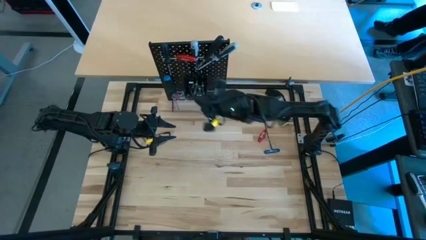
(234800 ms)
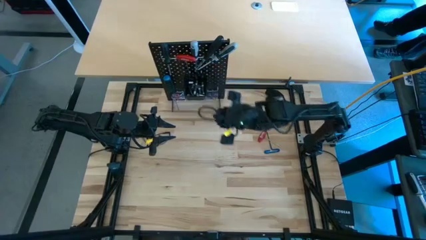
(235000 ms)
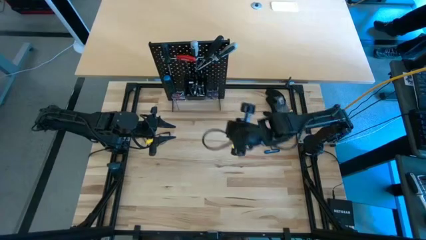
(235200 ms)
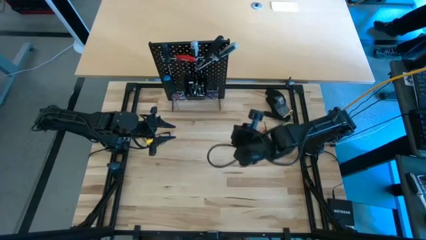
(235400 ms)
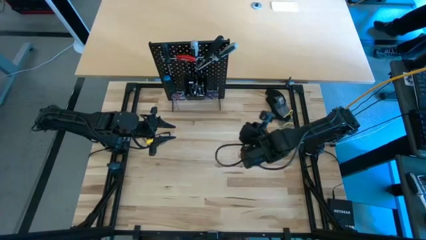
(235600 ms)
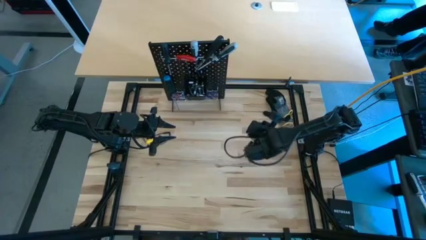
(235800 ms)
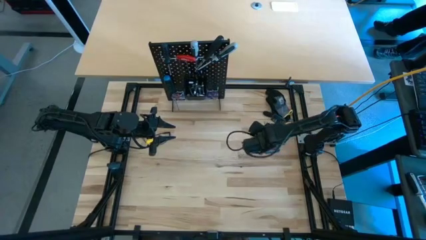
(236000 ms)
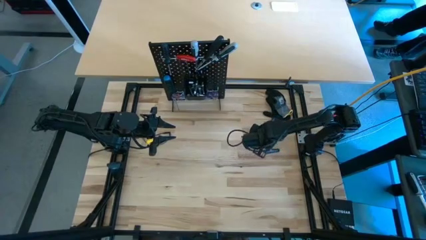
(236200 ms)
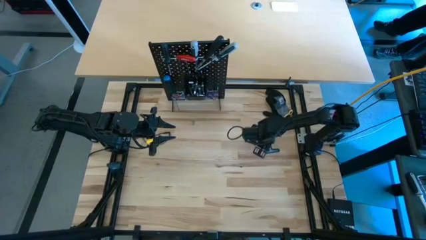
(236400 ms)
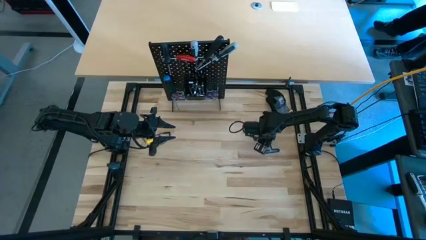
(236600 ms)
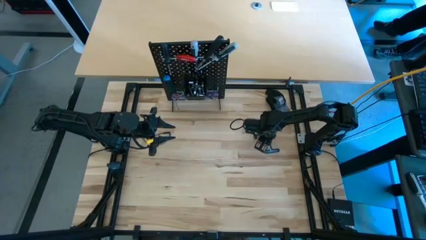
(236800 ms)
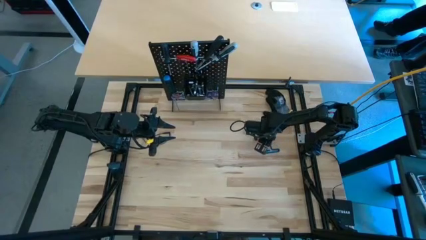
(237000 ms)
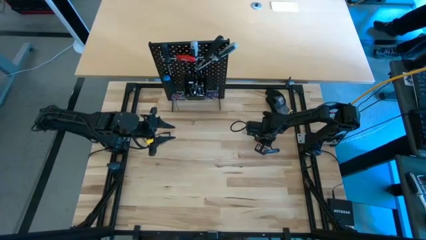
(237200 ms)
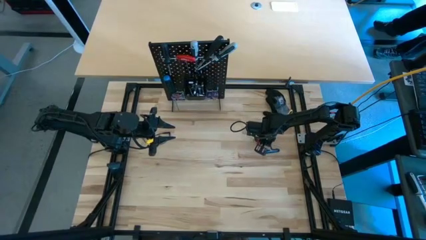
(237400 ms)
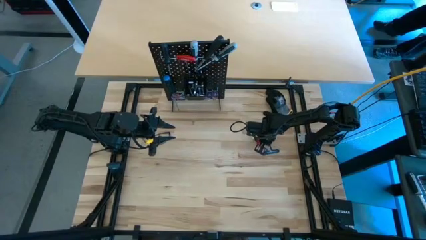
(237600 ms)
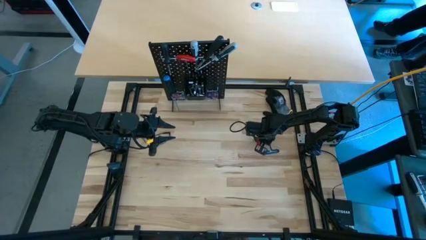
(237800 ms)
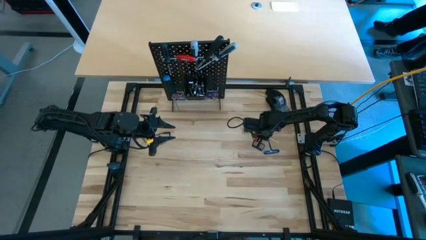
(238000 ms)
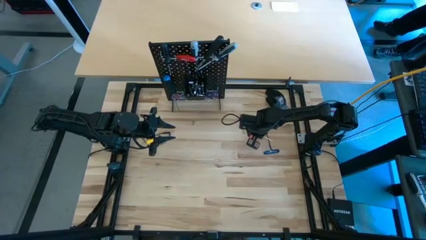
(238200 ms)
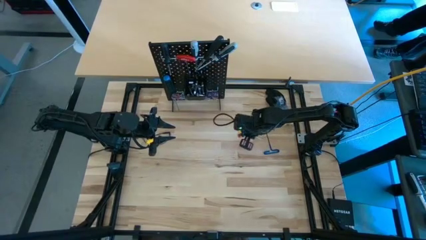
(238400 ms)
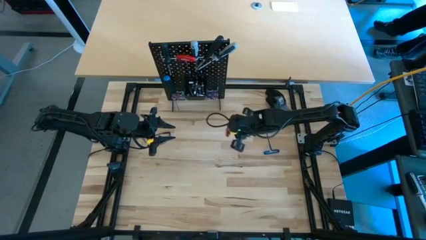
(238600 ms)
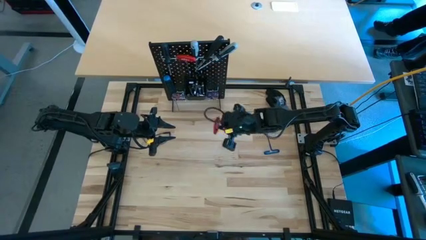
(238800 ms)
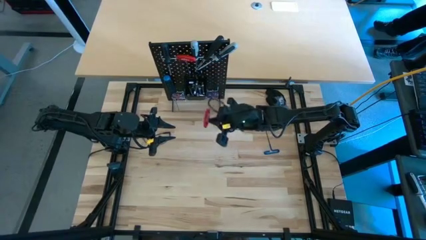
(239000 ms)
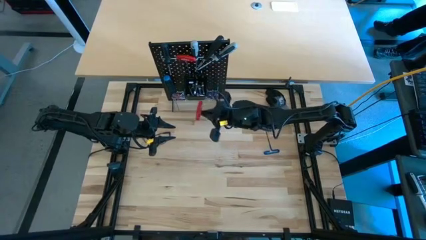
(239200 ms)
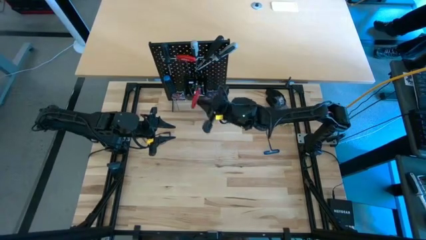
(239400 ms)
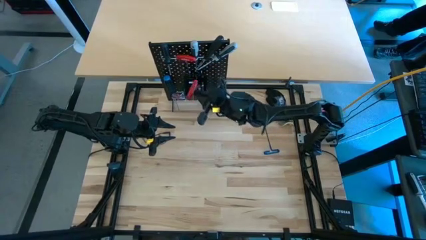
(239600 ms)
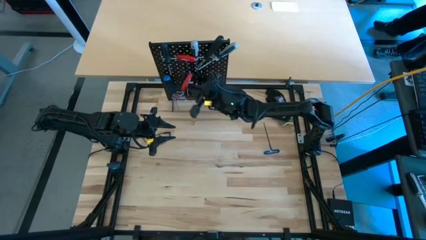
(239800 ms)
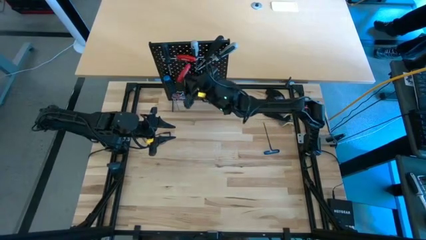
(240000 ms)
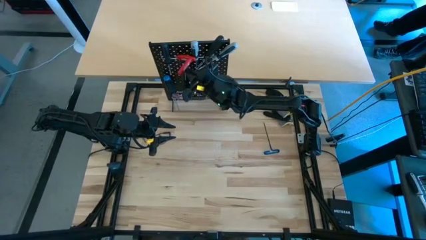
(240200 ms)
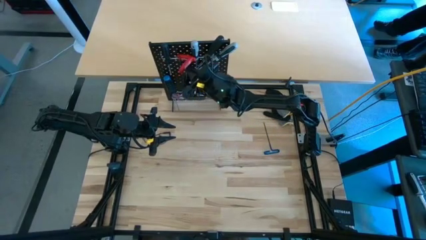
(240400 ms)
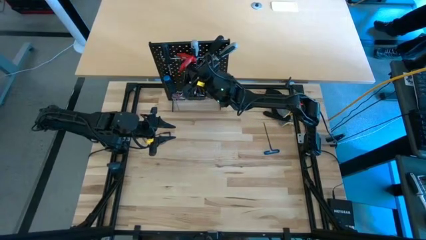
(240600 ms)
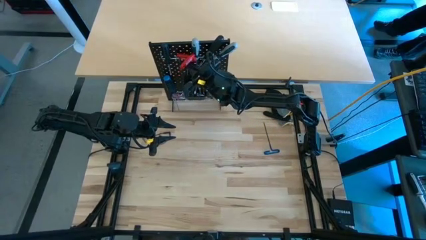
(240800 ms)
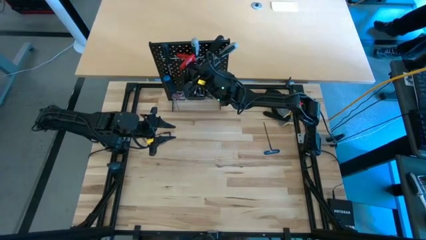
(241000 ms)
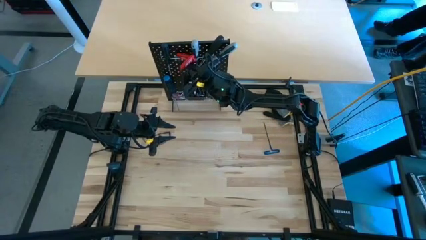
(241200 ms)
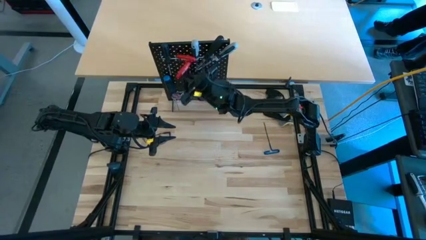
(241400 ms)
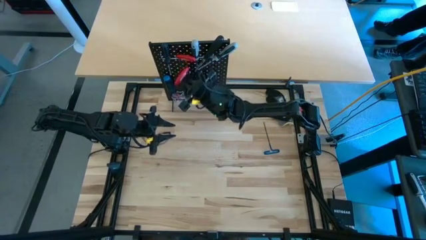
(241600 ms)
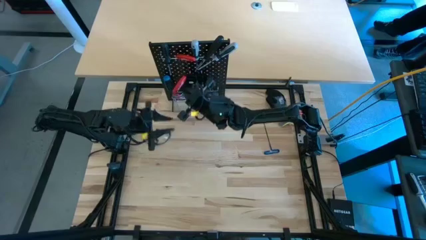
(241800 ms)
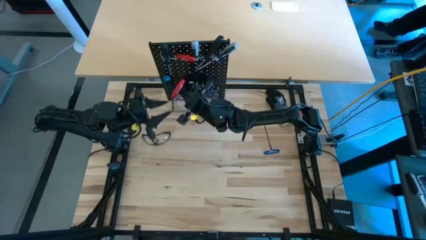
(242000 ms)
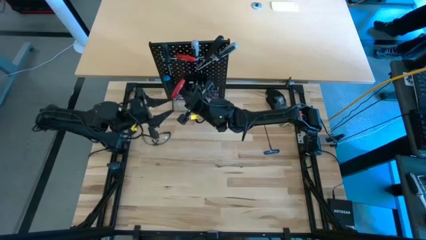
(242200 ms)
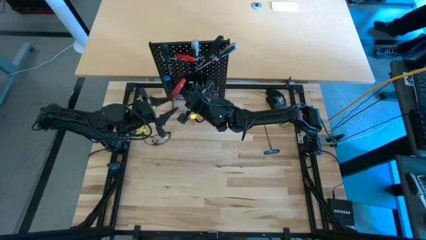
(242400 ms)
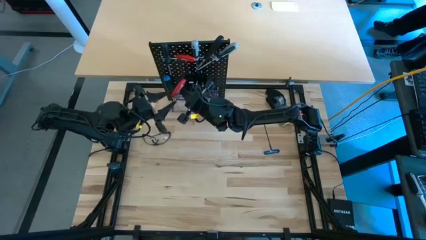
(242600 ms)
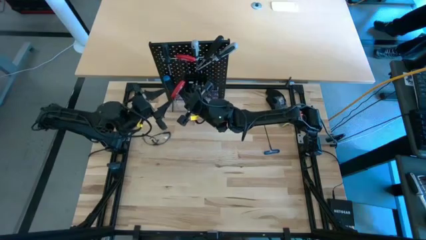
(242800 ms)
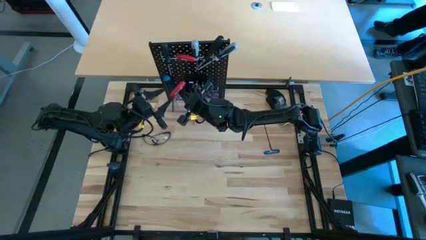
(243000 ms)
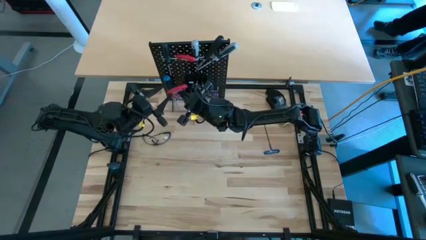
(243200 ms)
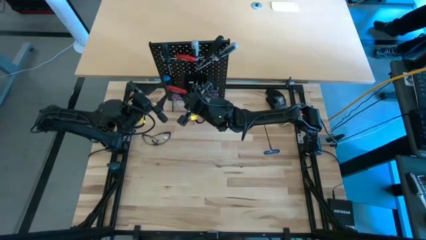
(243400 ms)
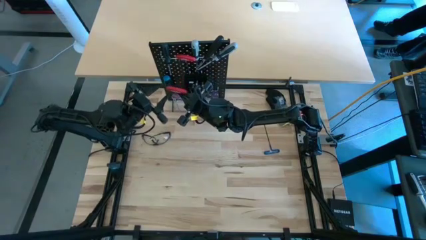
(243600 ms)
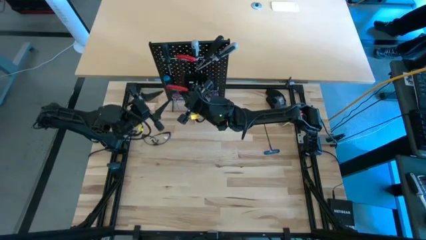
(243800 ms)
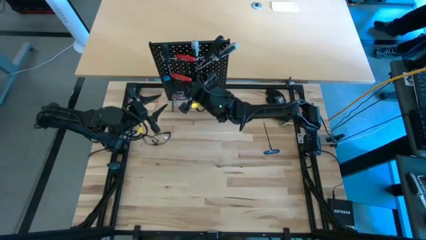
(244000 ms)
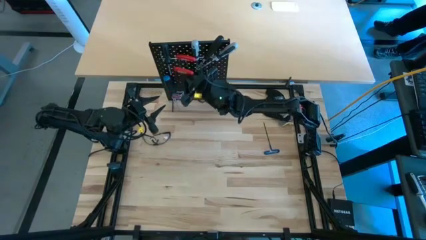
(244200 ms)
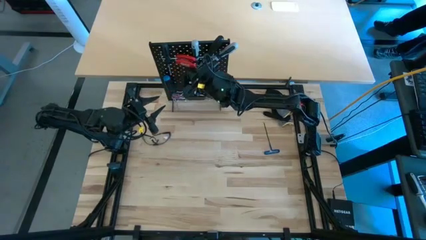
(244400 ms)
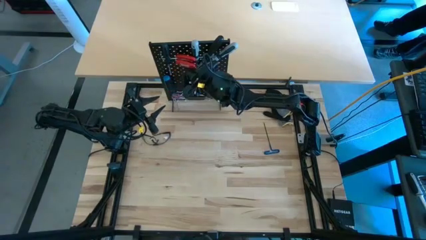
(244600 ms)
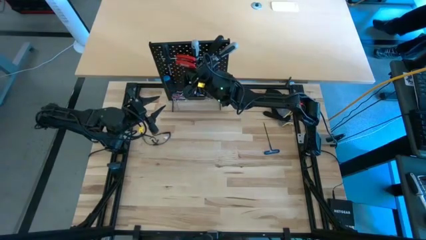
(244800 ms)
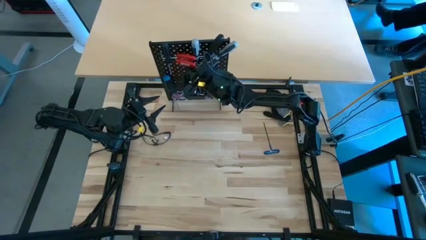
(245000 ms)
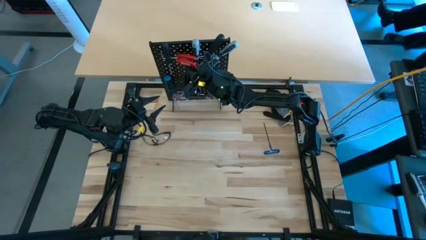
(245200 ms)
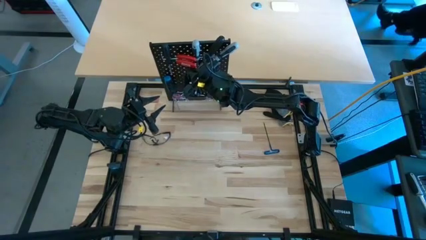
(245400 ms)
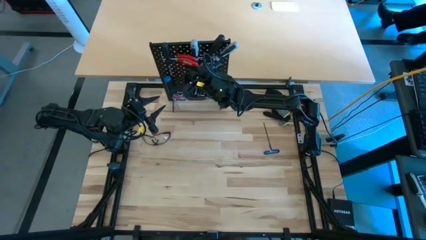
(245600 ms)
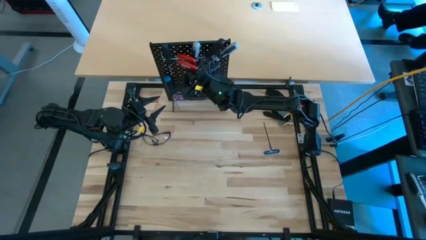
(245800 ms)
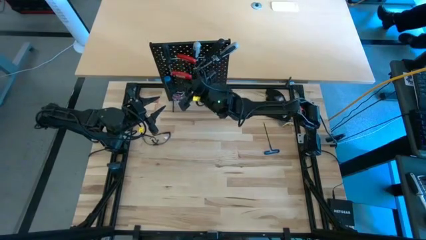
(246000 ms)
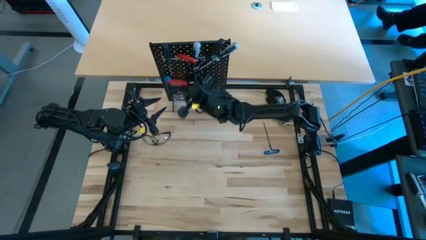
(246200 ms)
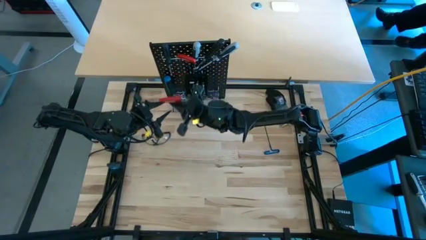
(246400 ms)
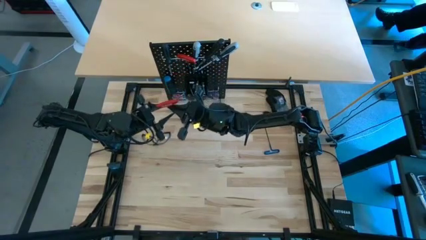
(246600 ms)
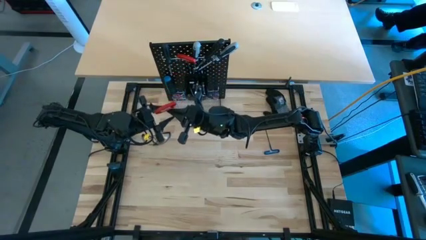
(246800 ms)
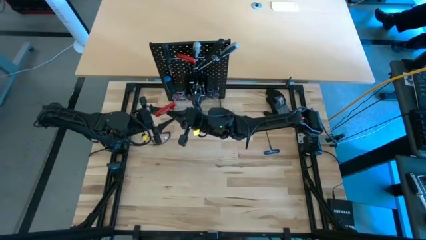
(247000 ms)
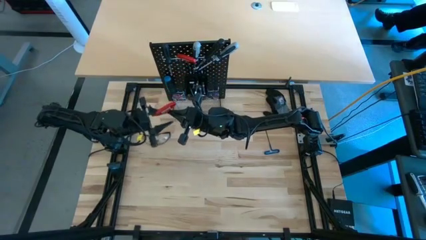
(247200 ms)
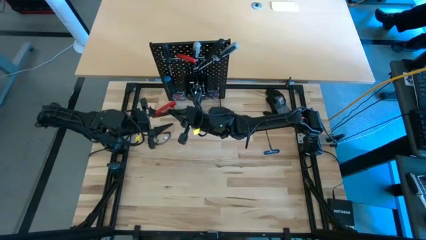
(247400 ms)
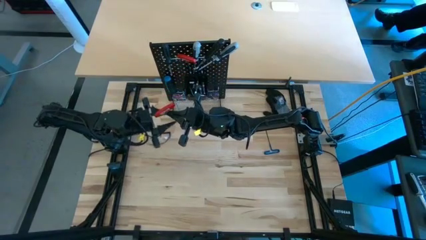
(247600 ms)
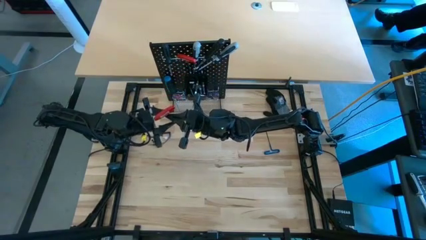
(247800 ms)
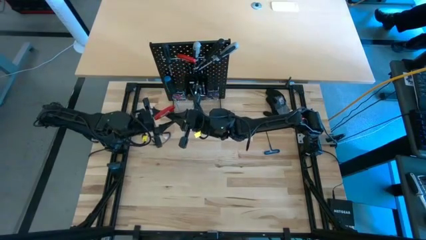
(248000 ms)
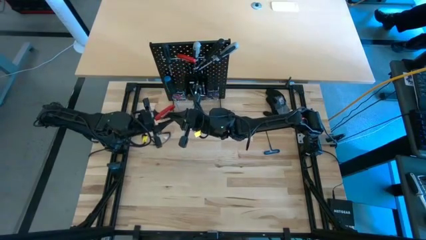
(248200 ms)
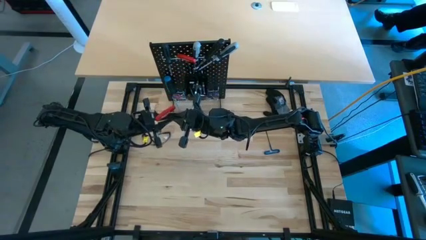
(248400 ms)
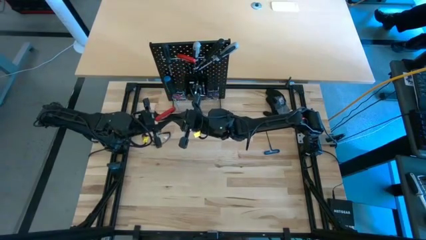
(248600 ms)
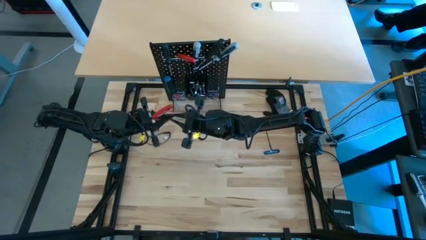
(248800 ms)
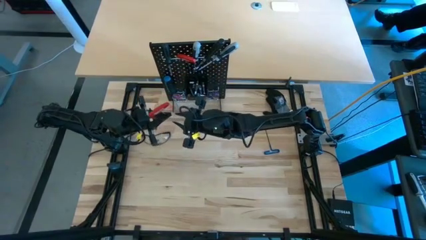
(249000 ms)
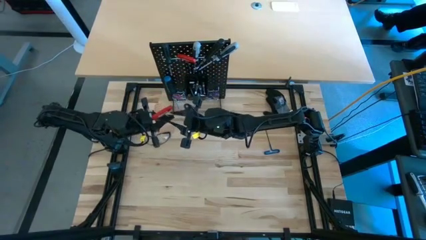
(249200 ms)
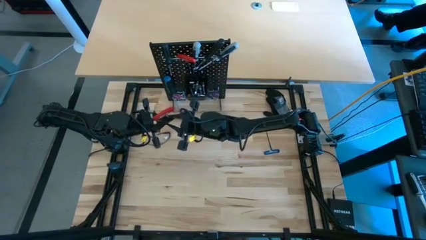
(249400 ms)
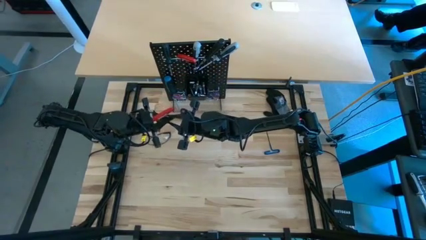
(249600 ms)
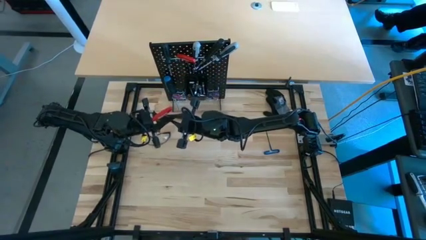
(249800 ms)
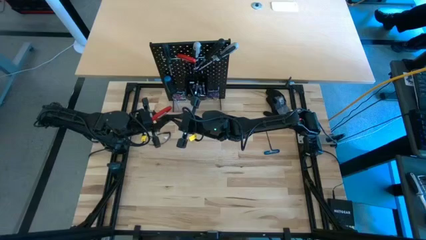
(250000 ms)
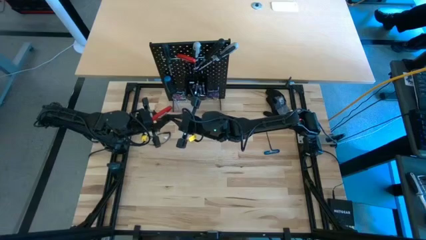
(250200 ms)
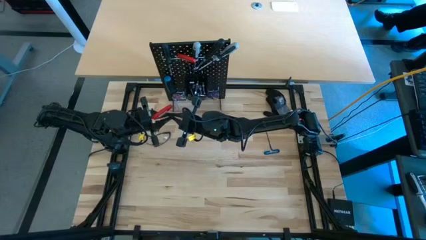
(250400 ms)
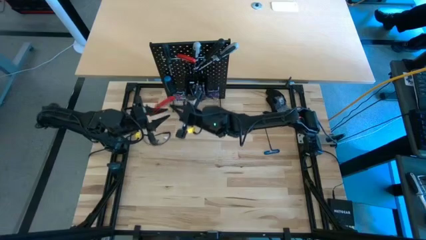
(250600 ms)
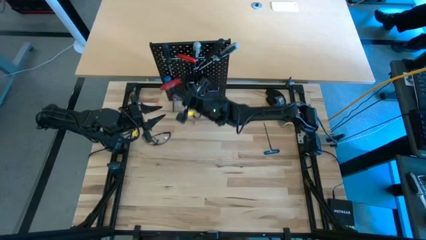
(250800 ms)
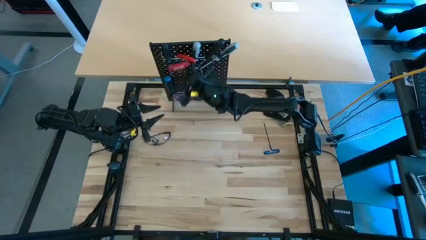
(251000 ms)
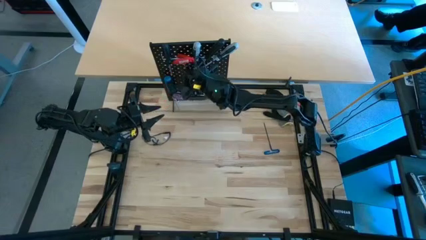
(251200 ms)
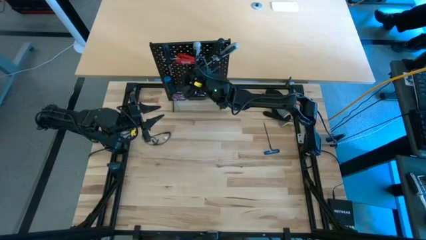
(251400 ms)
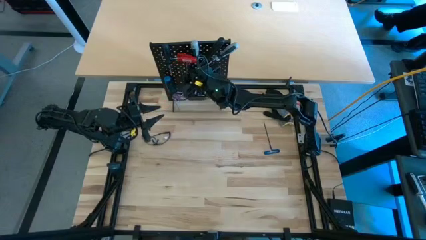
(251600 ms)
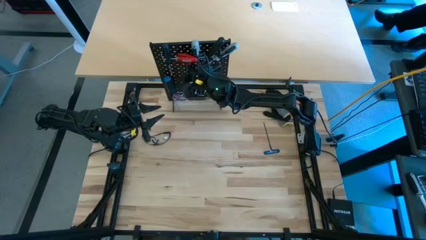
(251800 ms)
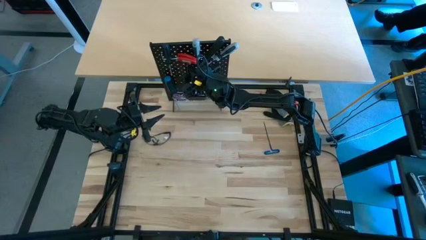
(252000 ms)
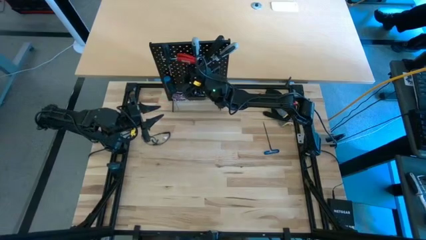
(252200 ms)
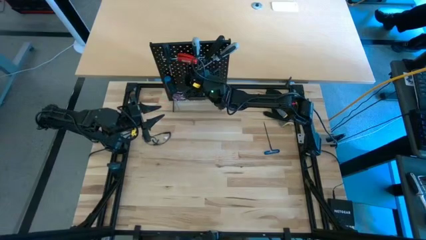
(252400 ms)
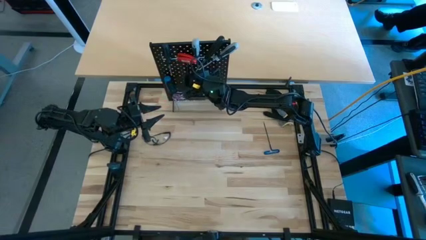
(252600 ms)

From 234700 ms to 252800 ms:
Task: Hang tools onto peg board
Hang the red t-handle hex key on the peg board
